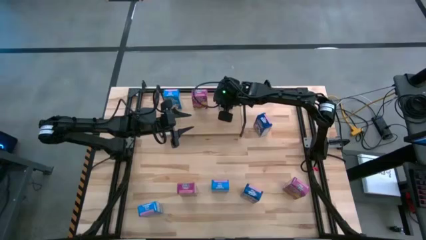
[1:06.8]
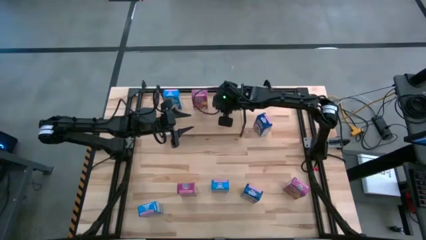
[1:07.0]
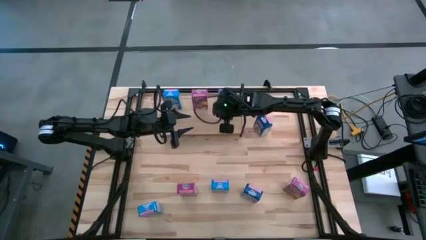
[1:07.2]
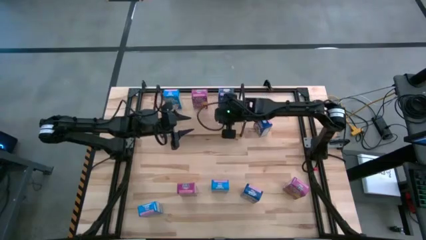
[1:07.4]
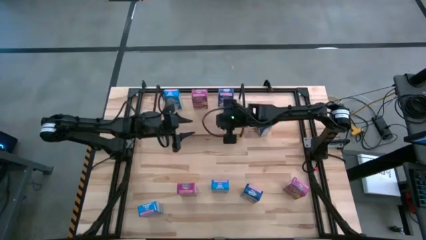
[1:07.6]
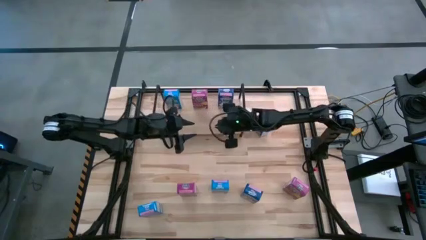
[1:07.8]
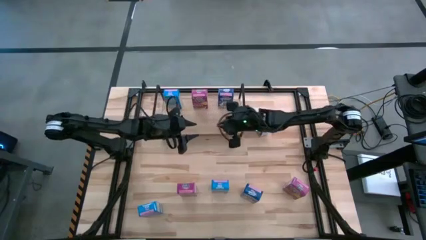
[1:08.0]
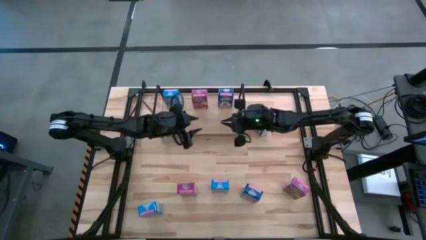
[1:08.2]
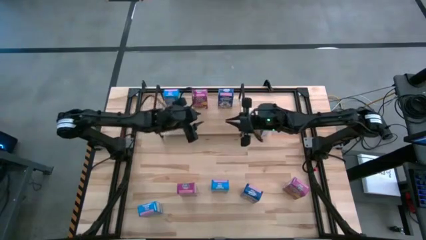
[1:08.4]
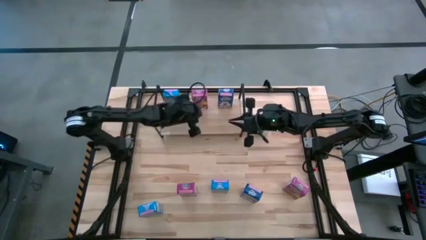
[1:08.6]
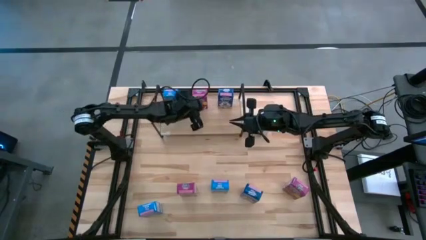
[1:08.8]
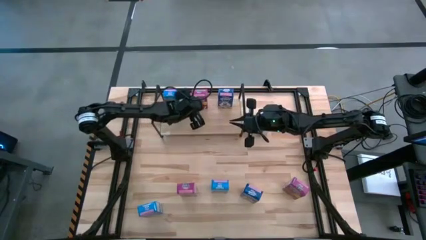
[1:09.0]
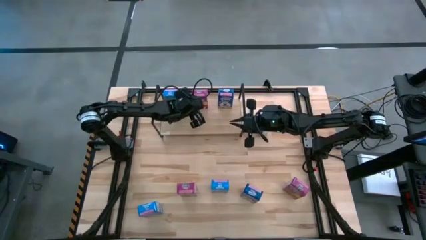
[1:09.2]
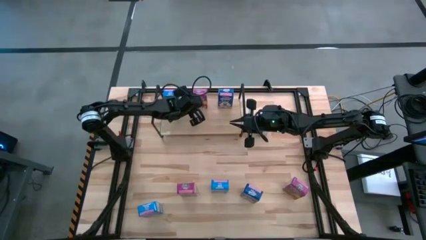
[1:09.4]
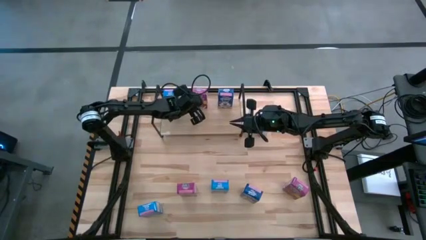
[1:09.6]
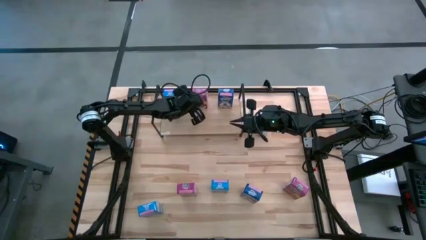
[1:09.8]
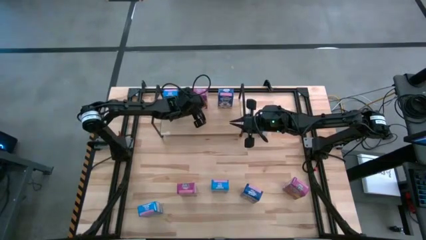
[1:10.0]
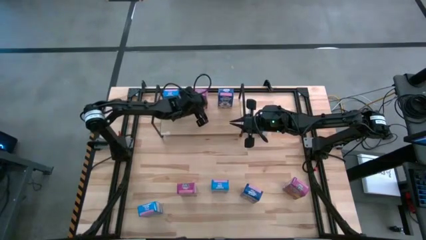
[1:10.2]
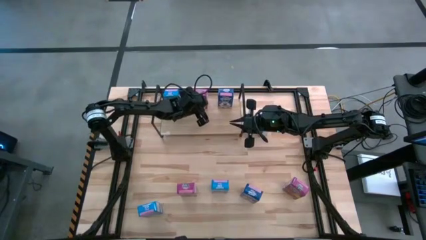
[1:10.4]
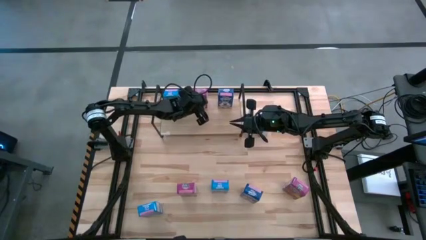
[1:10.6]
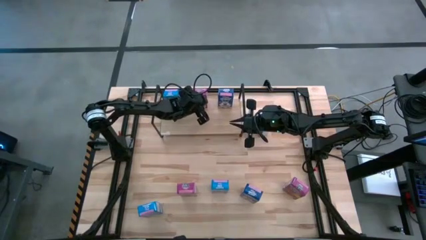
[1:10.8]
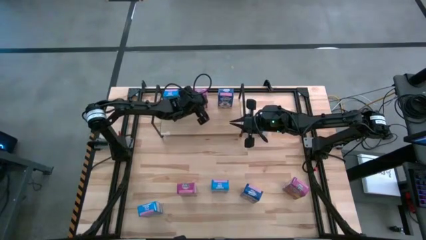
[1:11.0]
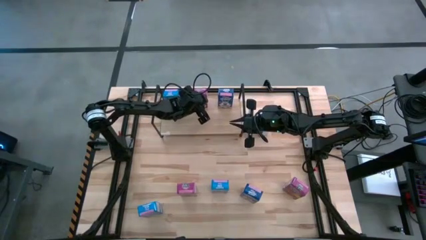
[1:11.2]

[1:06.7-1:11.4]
Task: Stack cereal on shelf
Adjust the violet cereal box on the shelf

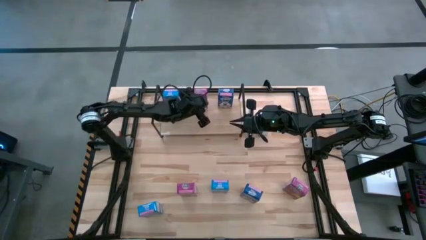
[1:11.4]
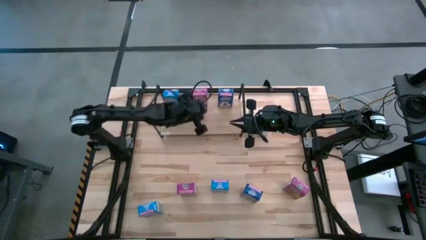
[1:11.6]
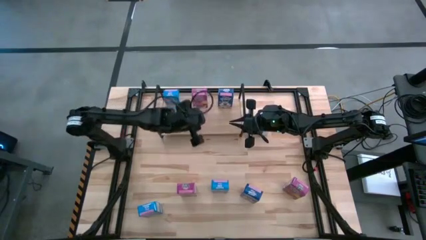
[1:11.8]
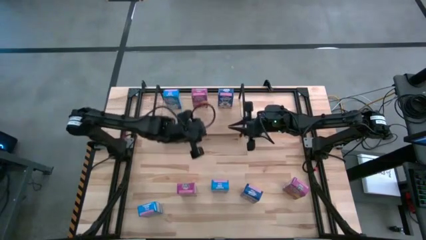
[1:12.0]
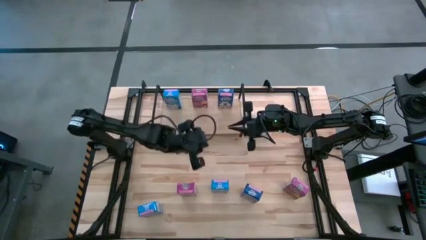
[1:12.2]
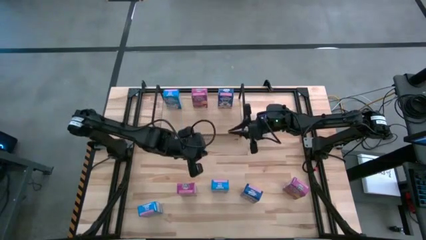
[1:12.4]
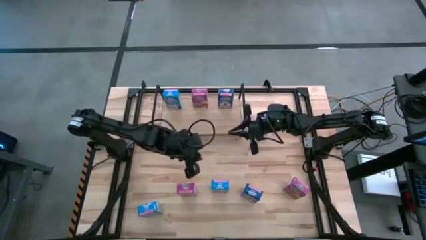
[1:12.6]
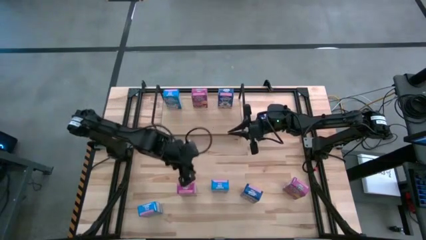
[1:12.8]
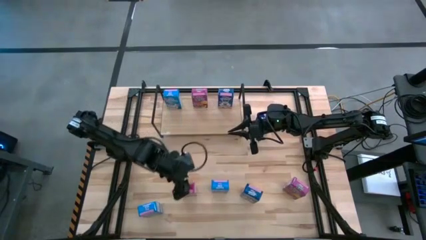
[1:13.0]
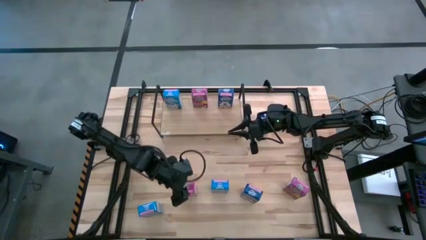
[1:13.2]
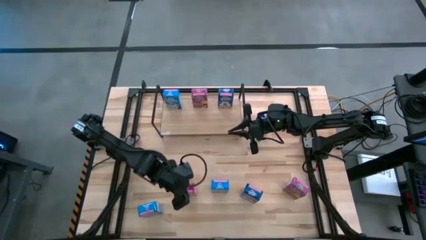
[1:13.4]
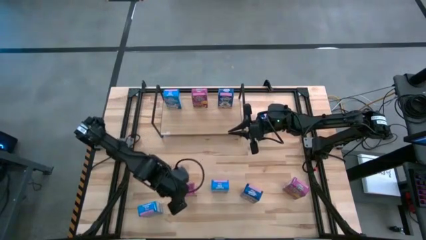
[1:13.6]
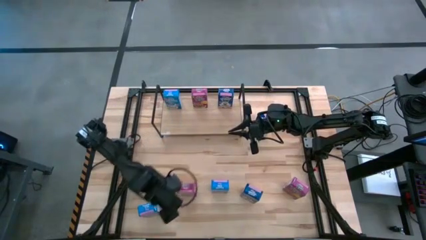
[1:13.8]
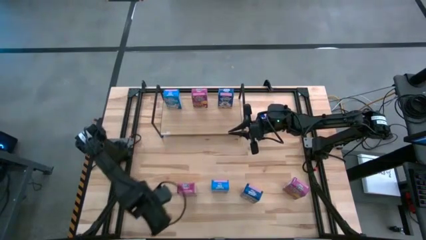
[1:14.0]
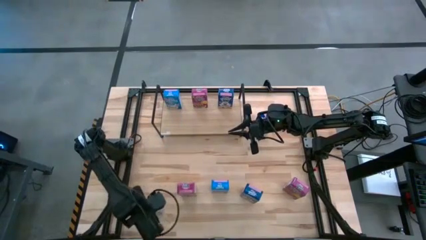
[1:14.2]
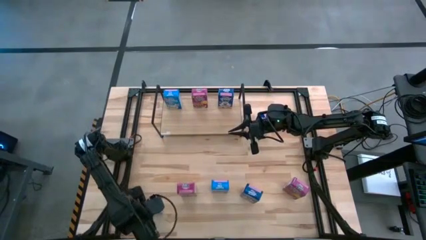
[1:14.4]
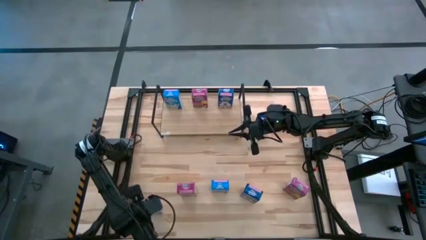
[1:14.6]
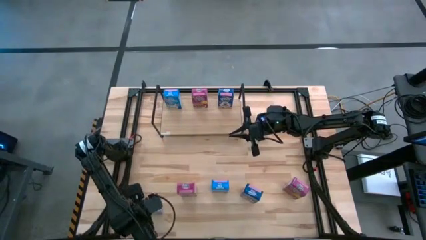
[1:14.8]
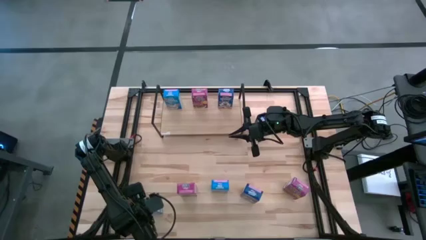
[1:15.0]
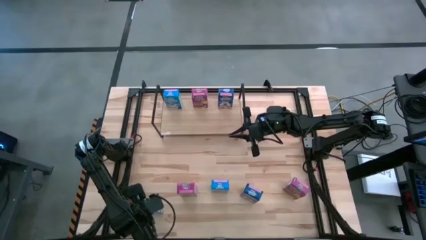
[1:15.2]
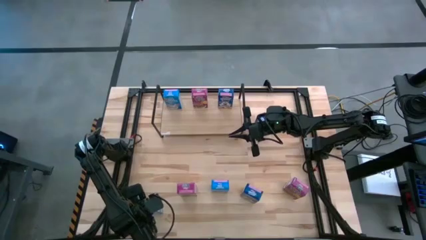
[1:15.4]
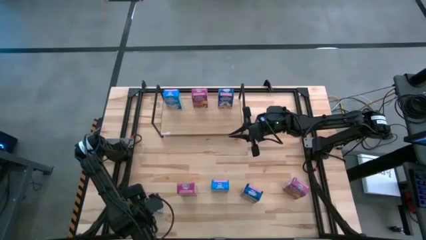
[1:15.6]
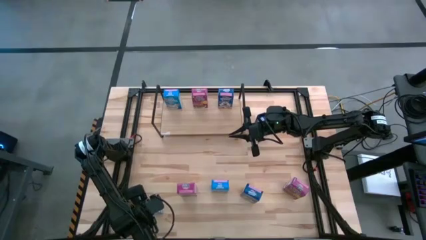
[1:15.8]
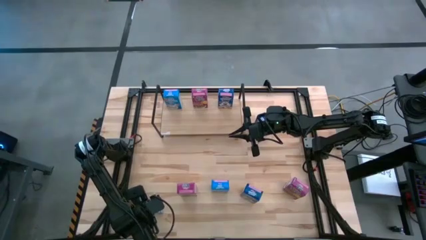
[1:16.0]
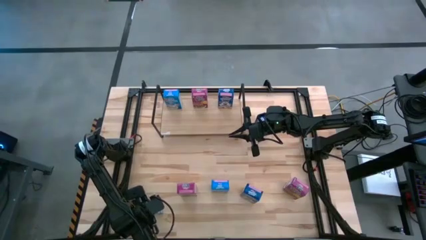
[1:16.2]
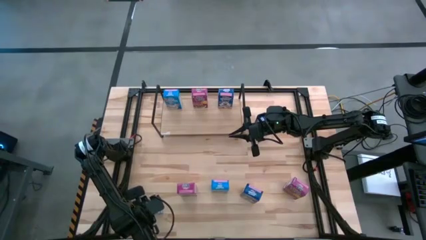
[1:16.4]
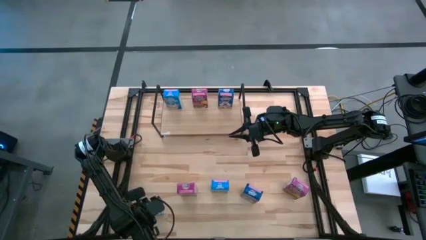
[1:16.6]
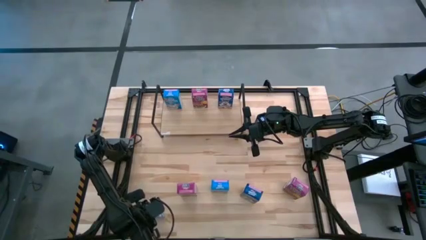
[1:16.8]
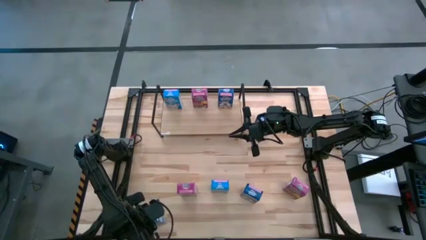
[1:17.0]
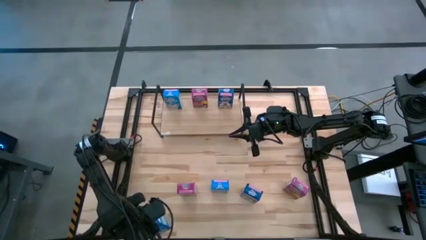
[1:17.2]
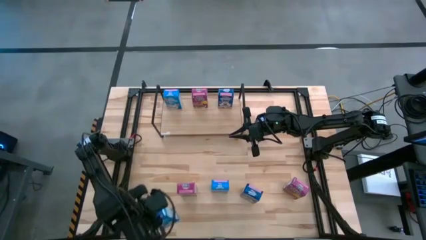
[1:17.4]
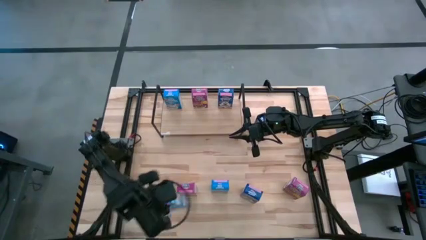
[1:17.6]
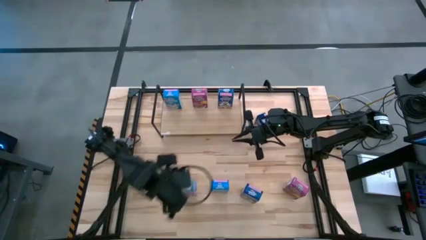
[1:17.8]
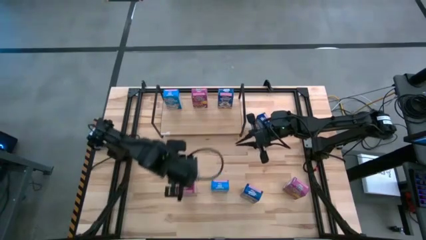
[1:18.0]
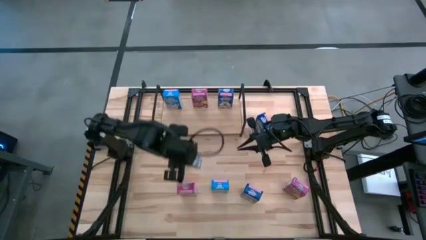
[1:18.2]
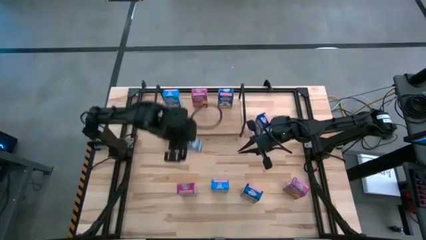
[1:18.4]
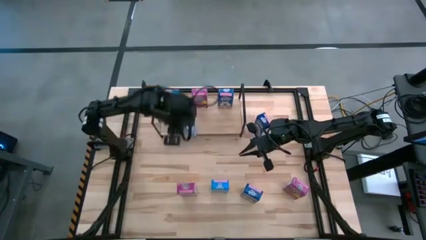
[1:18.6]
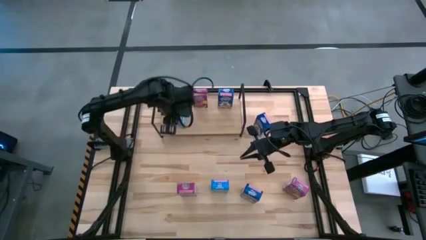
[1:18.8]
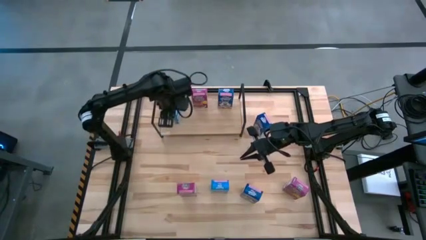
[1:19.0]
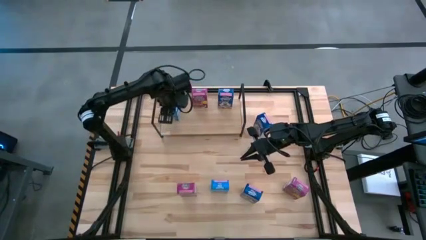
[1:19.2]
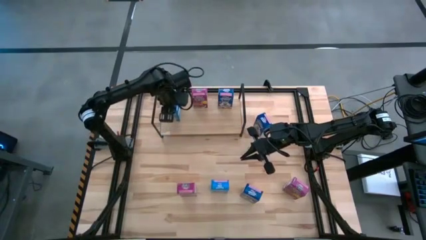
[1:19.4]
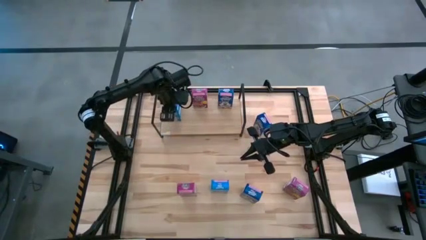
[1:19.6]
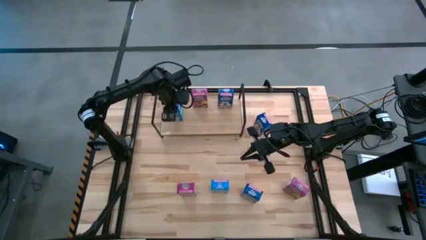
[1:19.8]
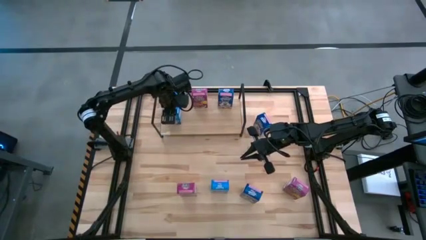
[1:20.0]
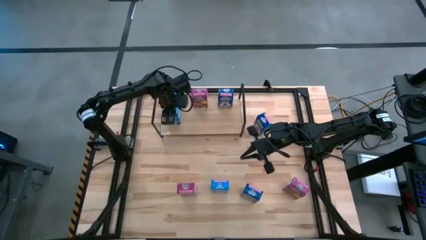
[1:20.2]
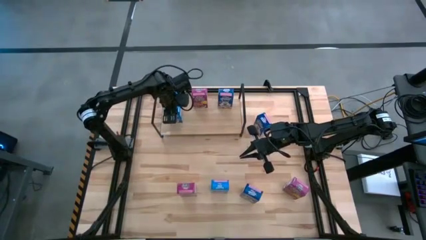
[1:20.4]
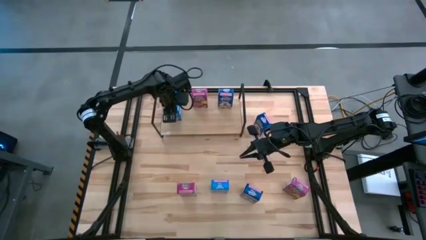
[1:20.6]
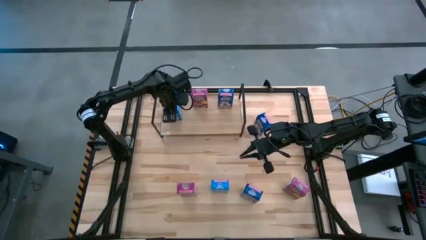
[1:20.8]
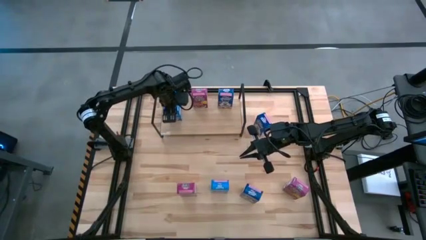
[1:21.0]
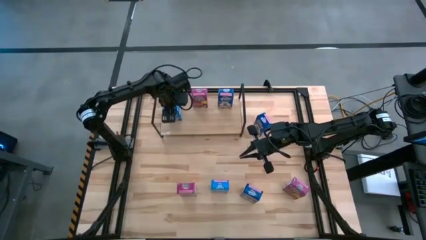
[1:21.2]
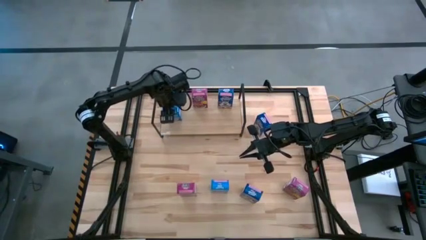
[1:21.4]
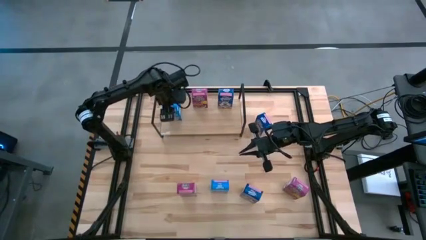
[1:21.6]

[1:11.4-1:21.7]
Put the bottom light blue cereal box on the shelf aligned with the light blue cereal box

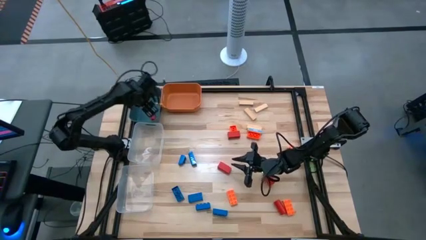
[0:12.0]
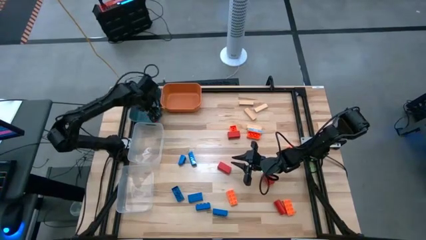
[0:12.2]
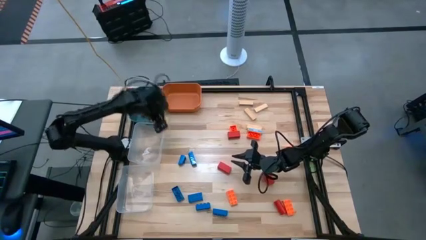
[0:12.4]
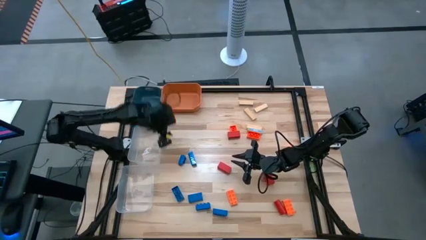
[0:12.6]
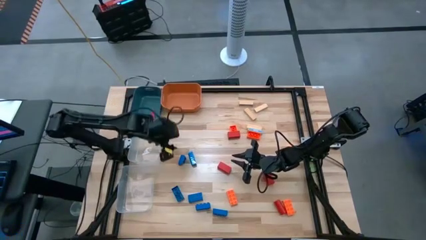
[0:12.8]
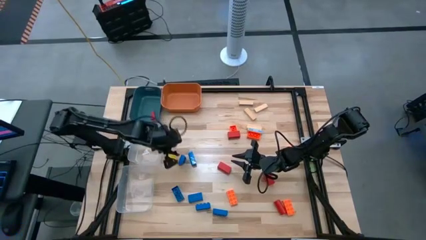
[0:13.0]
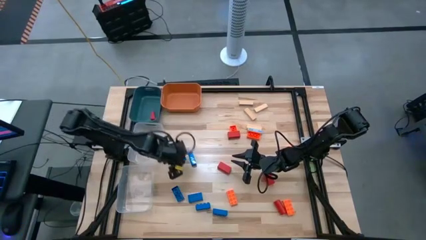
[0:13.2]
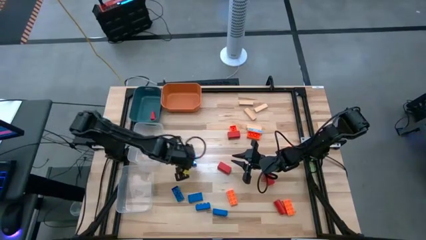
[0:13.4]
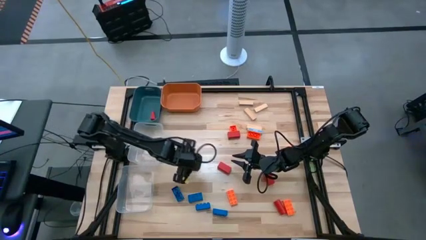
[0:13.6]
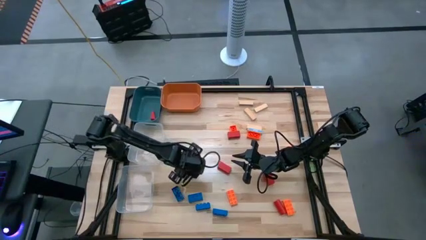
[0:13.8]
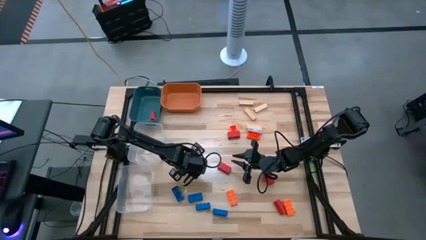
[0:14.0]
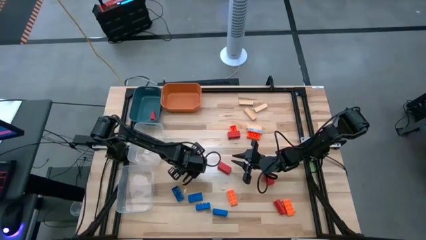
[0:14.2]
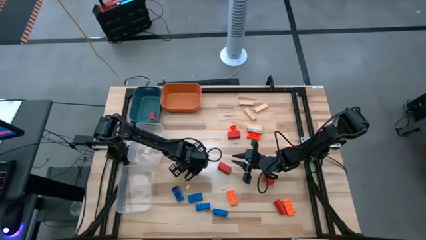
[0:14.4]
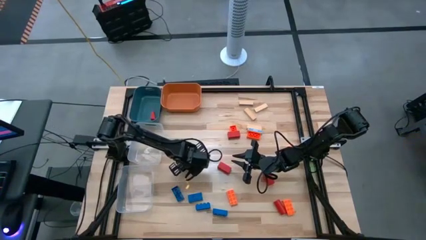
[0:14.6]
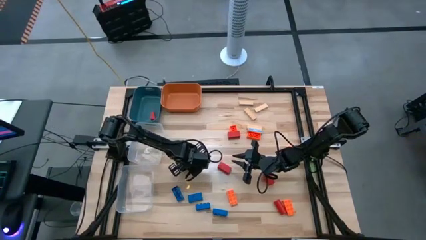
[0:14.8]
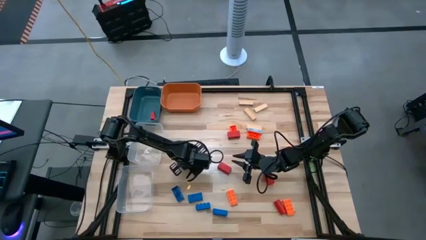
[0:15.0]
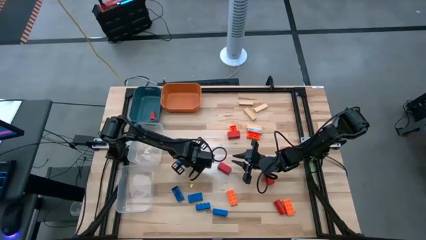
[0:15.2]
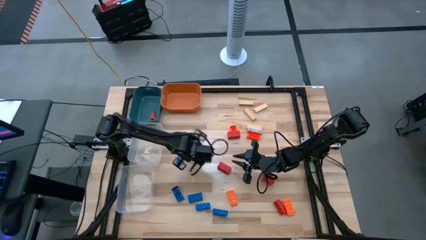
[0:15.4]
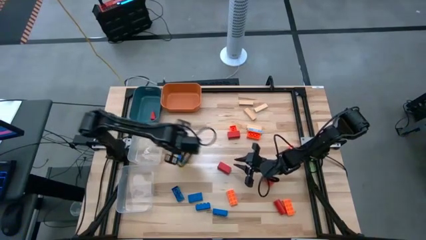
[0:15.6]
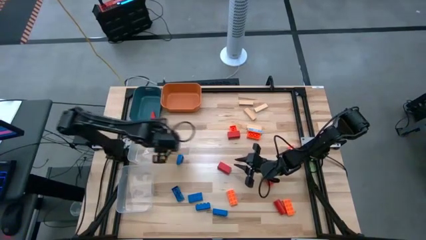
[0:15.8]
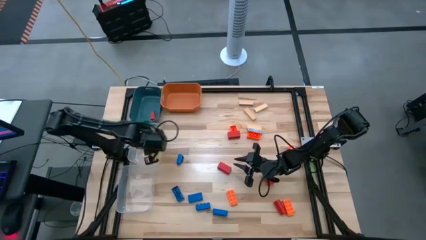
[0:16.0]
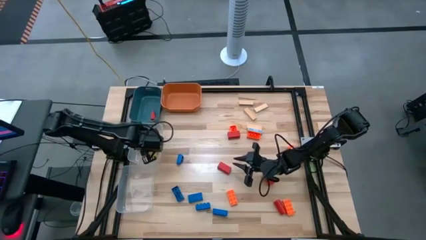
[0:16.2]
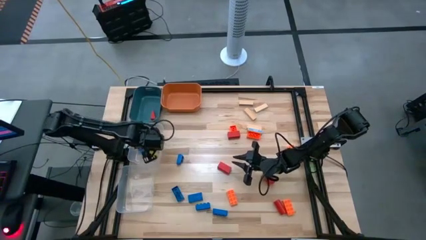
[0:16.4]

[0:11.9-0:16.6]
Task: Sort blocks
Put the blue game piece into the top transparent bin
